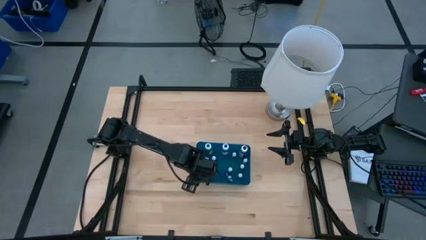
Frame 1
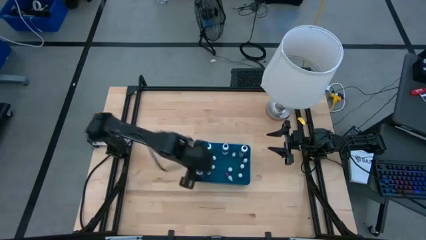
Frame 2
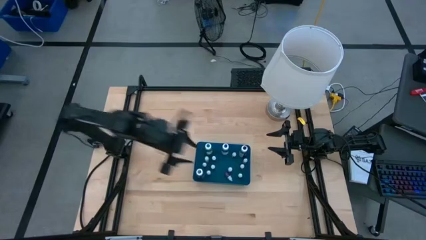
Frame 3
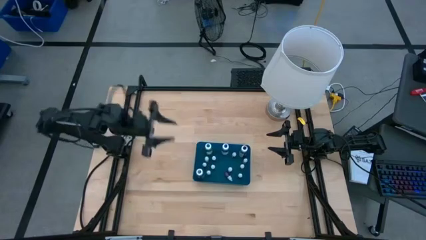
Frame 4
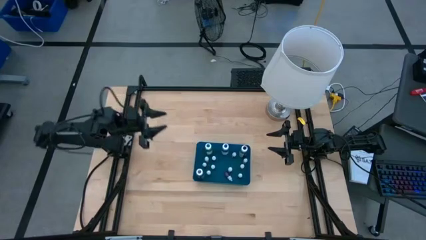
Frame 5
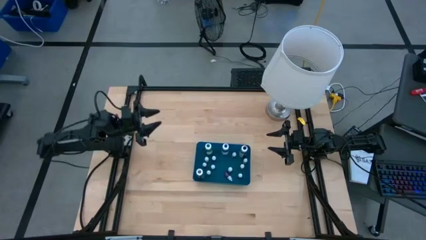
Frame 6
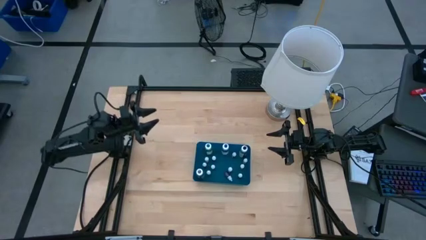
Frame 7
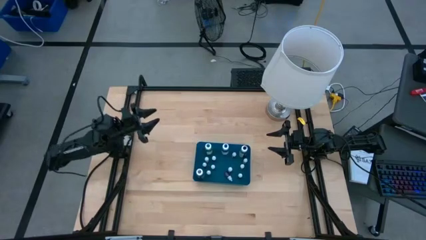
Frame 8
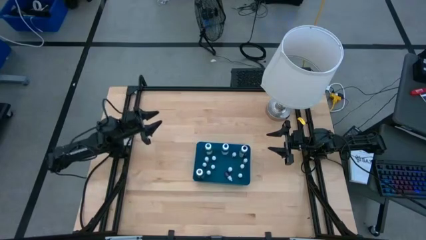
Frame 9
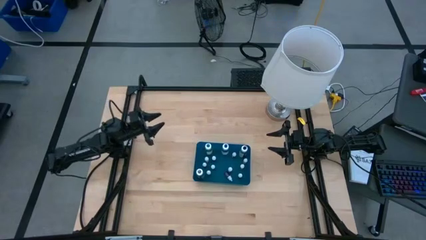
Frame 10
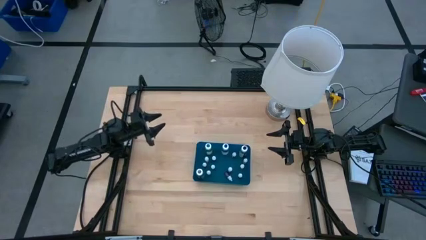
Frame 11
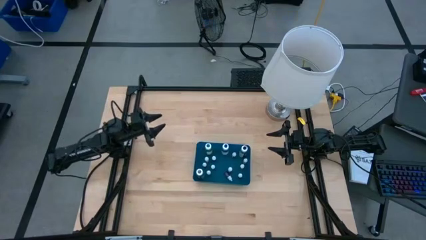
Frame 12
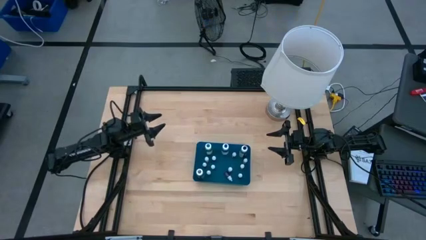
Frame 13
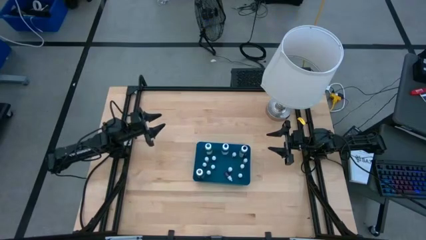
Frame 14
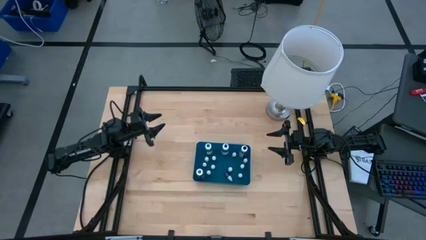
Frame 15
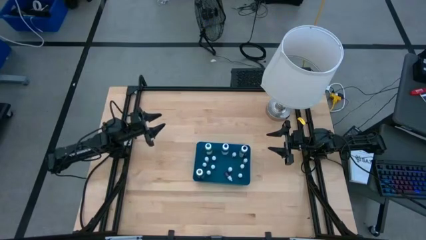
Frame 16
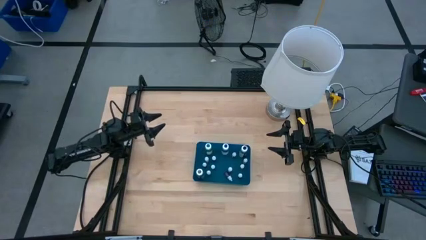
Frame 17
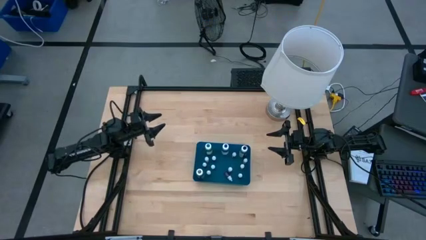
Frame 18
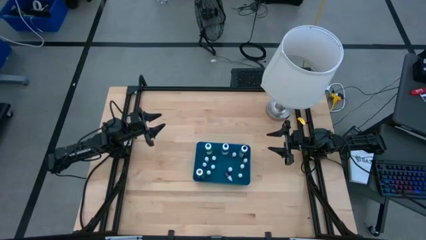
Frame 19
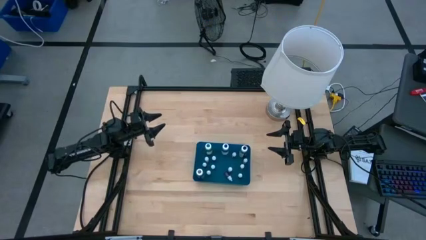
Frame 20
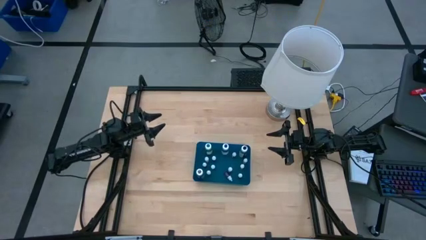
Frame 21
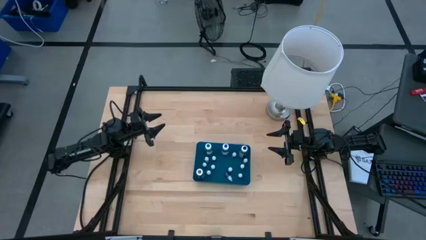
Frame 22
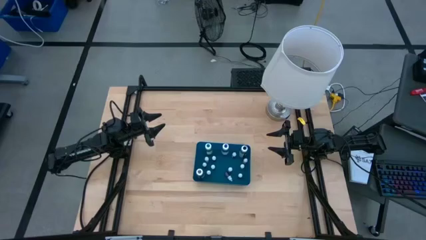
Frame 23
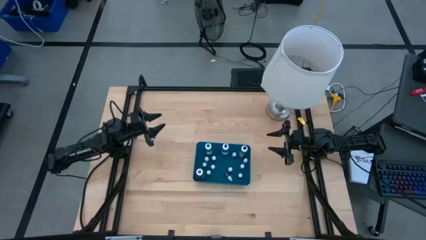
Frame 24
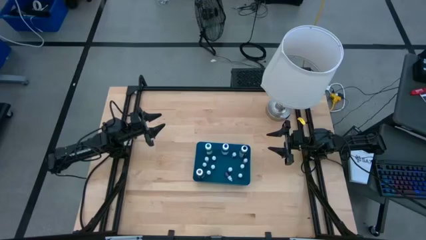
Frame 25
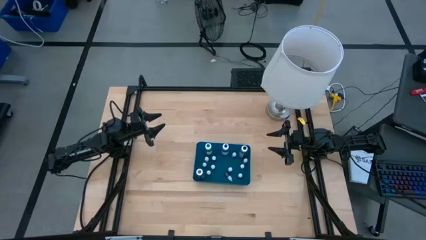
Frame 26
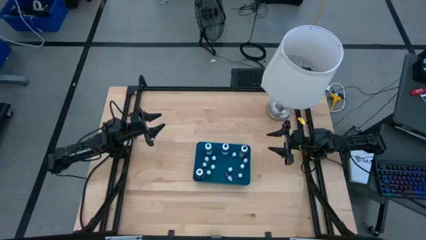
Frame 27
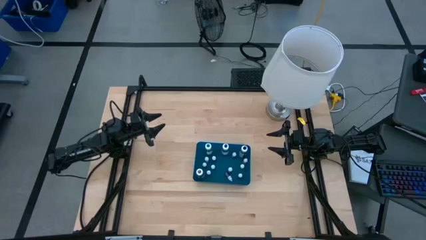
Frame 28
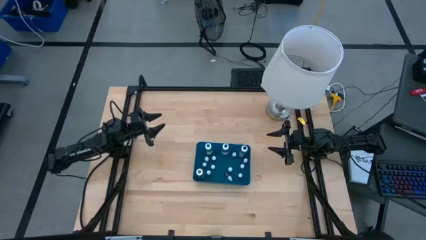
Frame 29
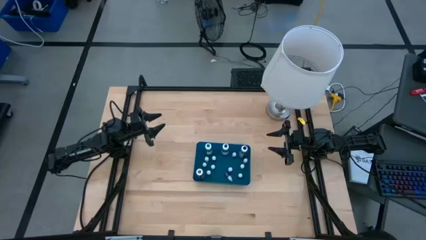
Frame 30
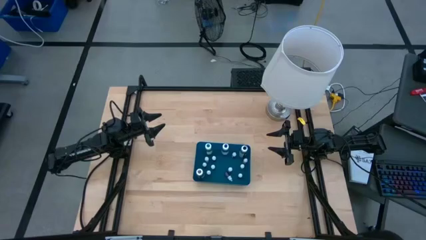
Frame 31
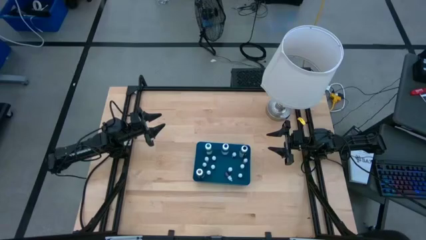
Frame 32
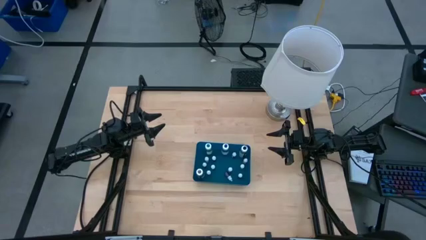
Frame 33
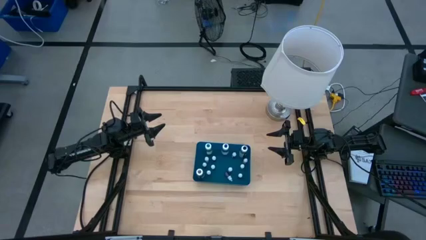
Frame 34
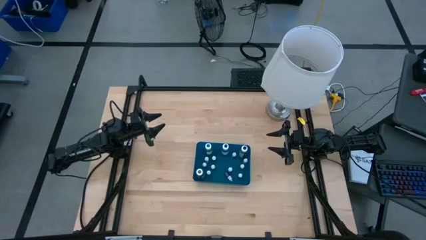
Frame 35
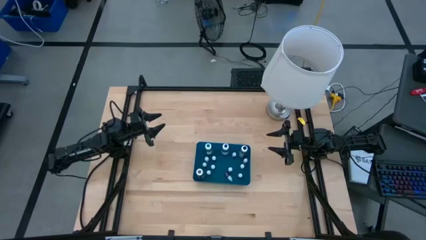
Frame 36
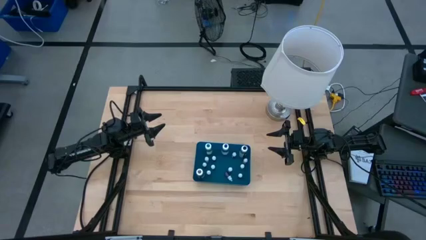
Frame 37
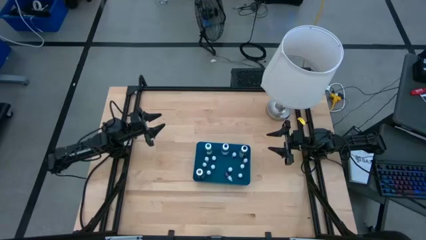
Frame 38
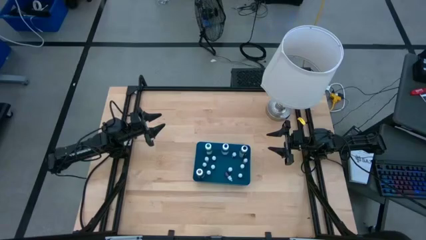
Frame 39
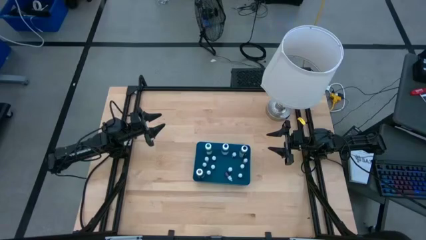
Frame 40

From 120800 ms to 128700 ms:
Task: Pick & Place food coloring
Return to Home Position

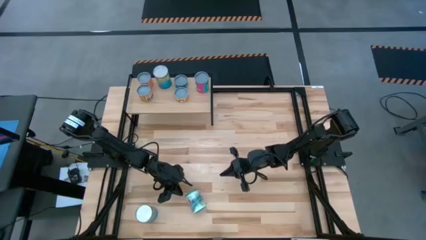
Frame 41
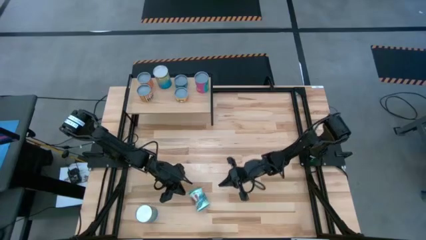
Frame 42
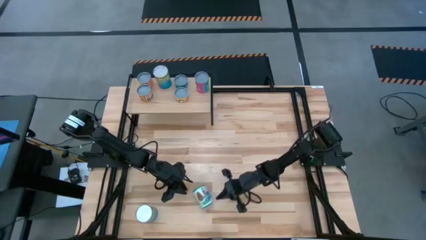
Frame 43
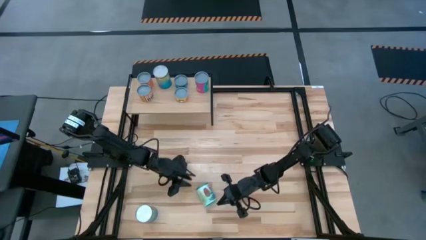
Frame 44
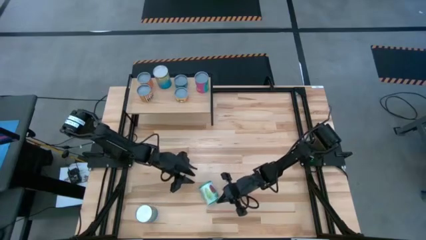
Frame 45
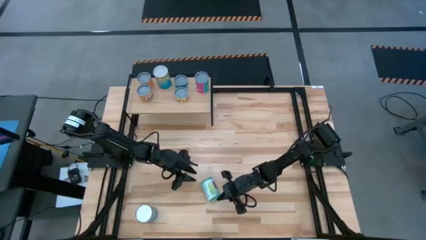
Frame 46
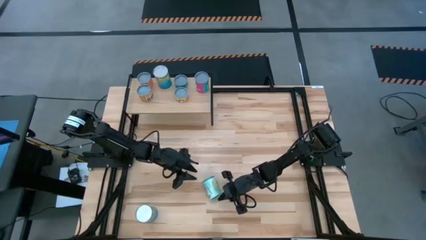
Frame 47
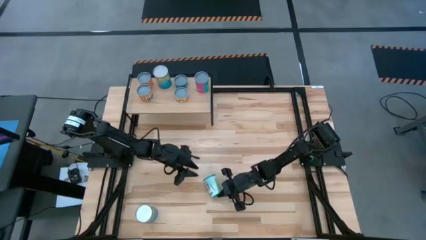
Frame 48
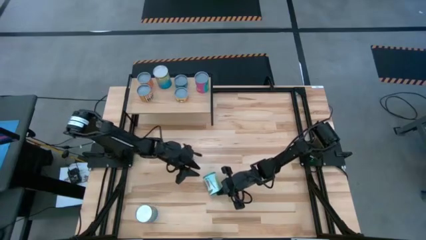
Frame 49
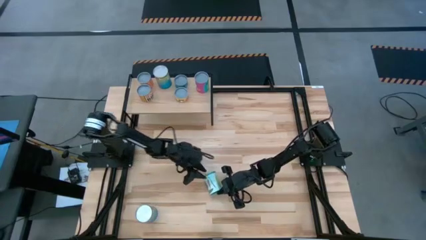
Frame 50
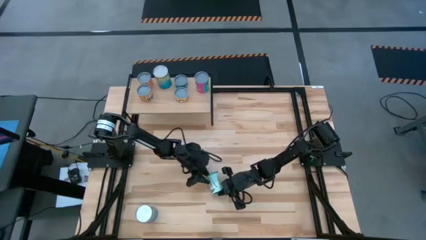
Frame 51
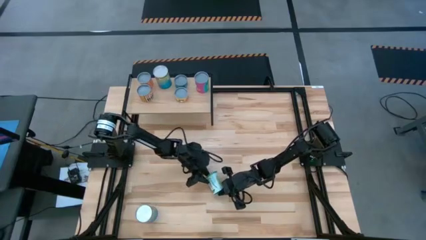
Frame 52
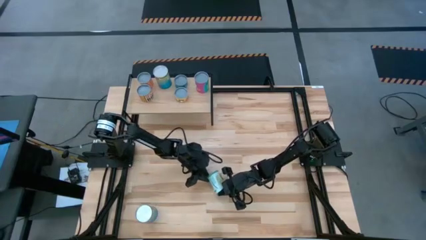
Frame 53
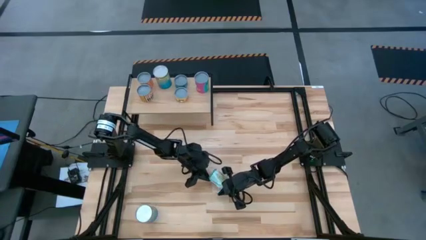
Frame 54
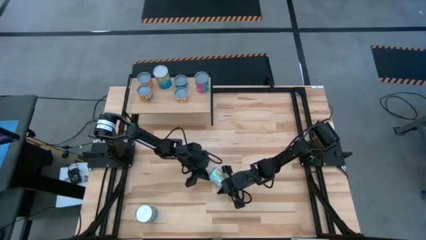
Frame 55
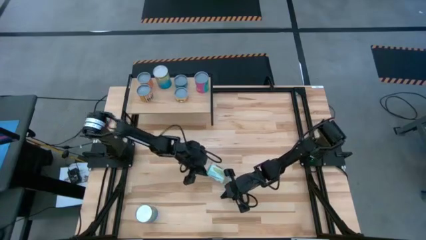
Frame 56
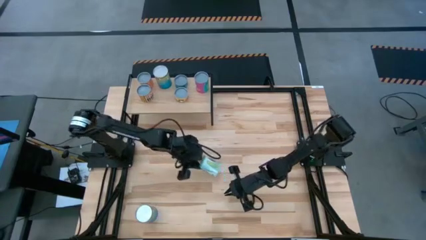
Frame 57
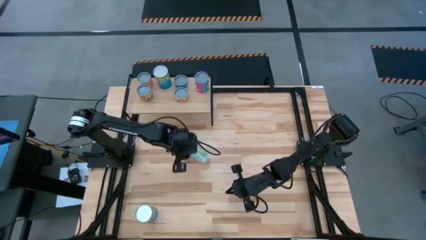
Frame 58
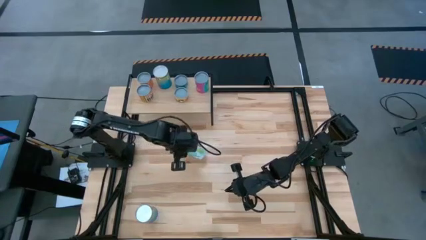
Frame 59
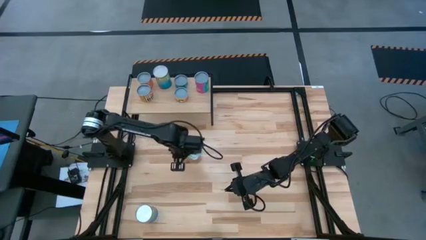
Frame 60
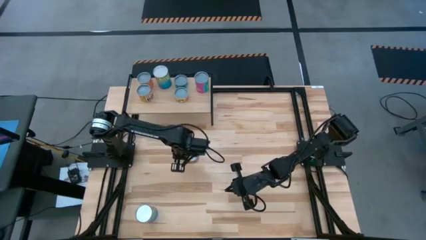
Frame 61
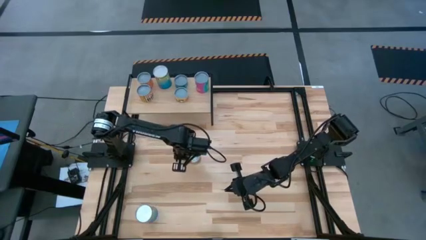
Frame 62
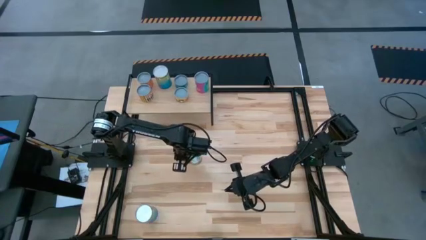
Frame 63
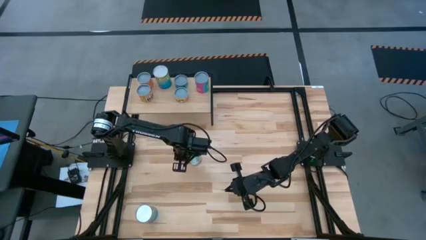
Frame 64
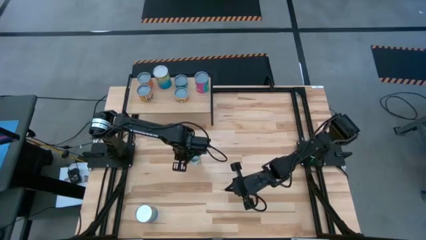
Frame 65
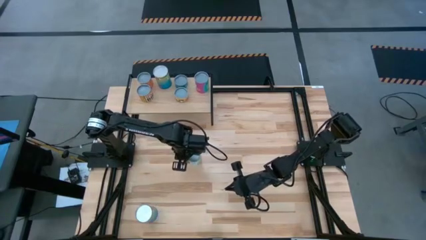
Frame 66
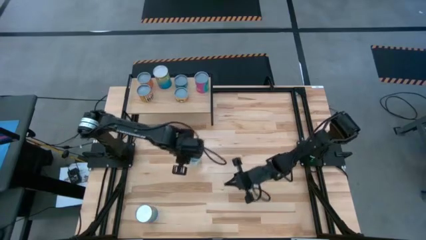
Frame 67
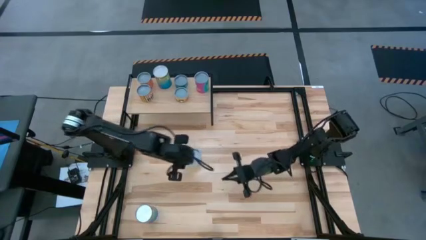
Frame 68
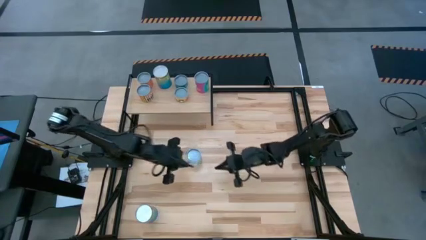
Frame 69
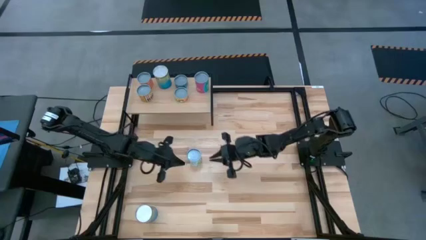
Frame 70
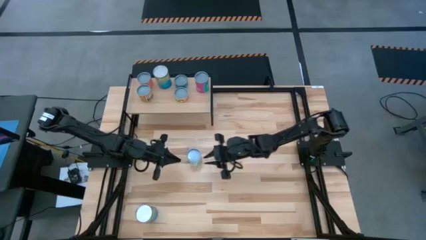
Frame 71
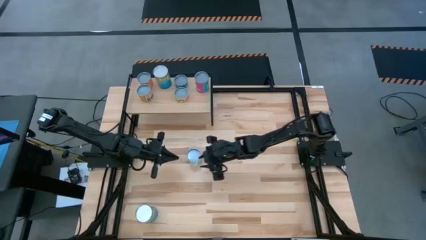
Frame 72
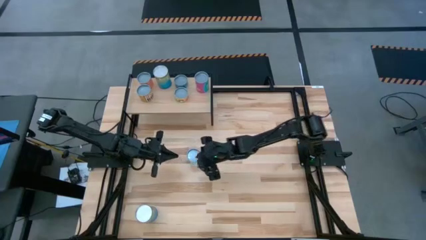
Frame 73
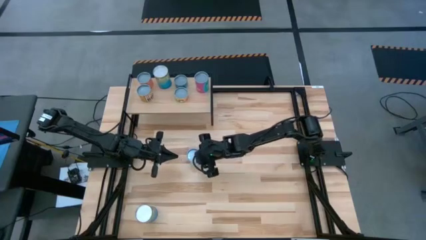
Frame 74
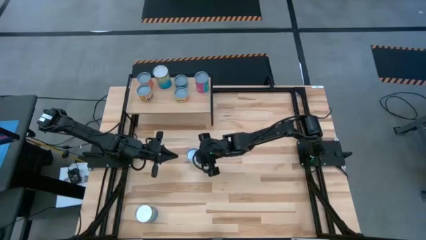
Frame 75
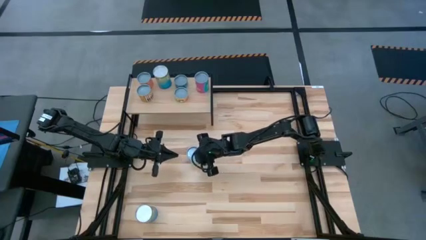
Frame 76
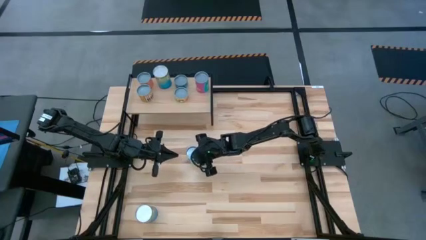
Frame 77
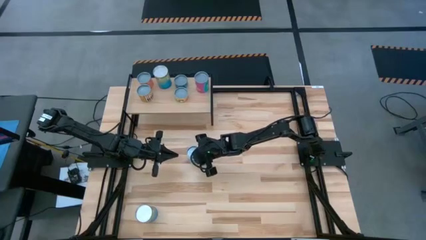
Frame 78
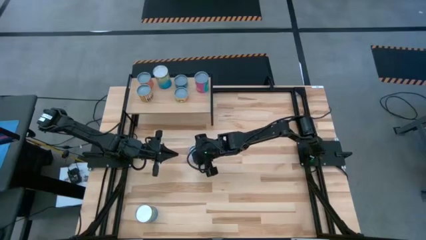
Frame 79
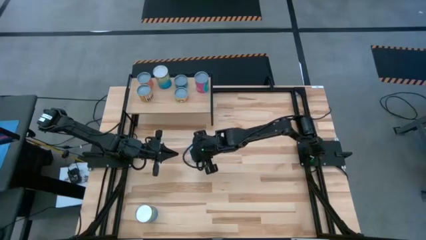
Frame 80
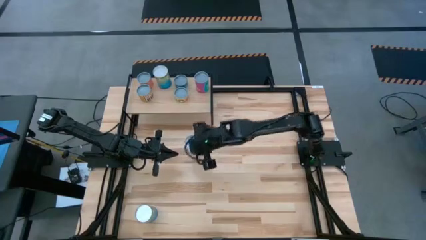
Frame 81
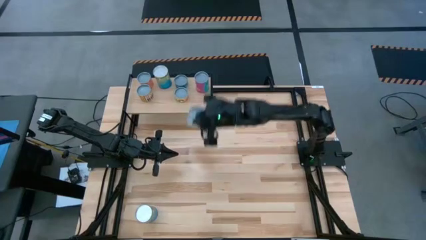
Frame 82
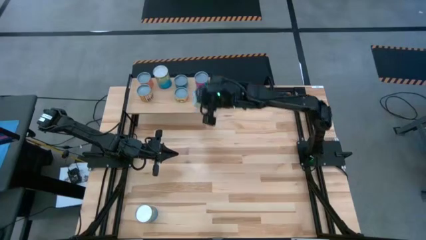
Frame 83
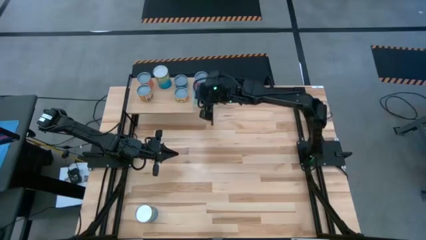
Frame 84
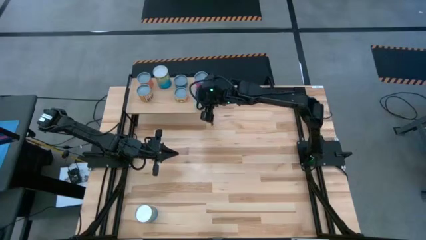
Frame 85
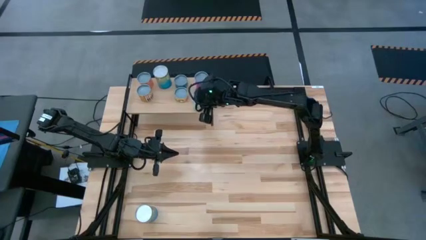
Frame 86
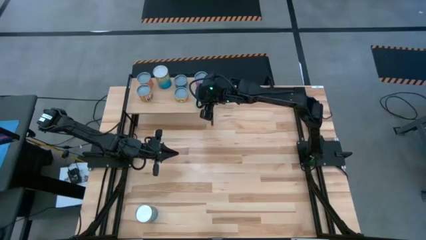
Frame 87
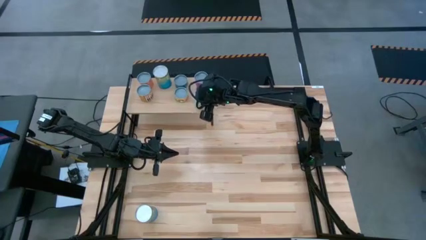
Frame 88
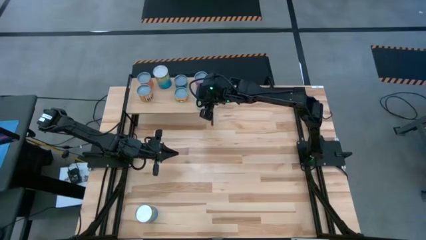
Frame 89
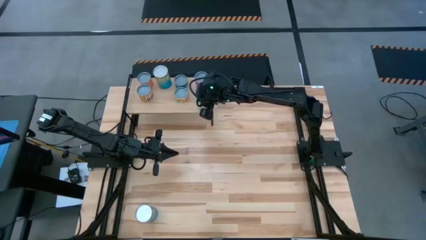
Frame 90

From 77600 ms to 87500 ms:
Task: Pick and place cans onto a shelf
Put the canned mixed vegetables on the shelf
